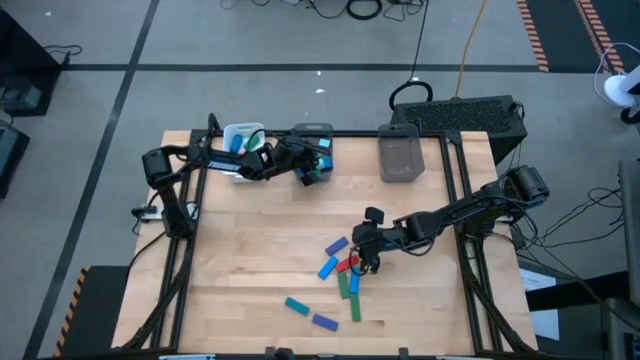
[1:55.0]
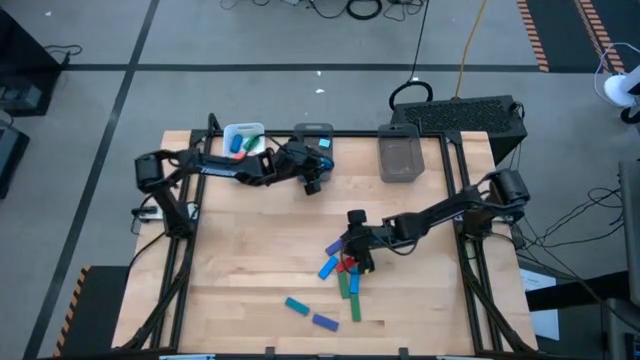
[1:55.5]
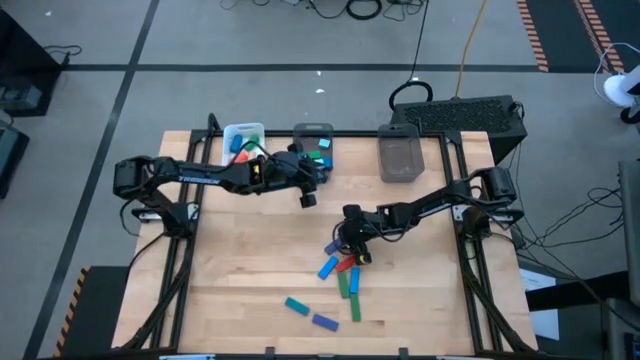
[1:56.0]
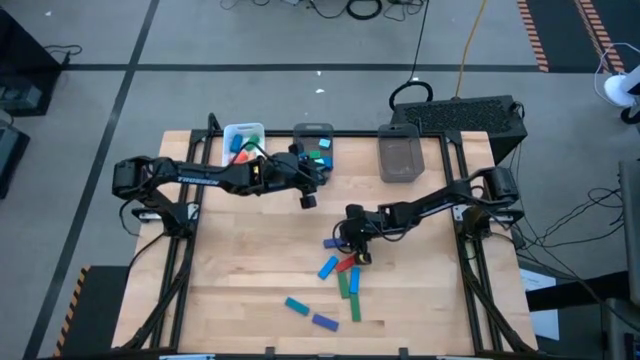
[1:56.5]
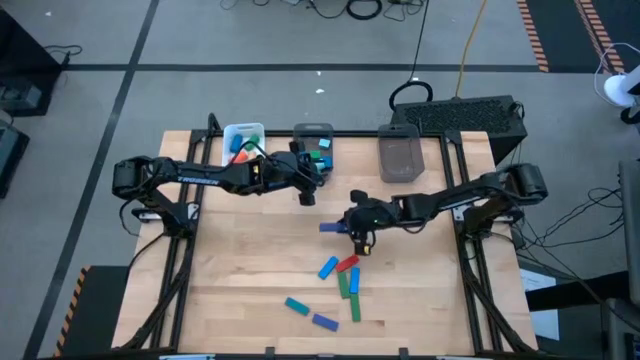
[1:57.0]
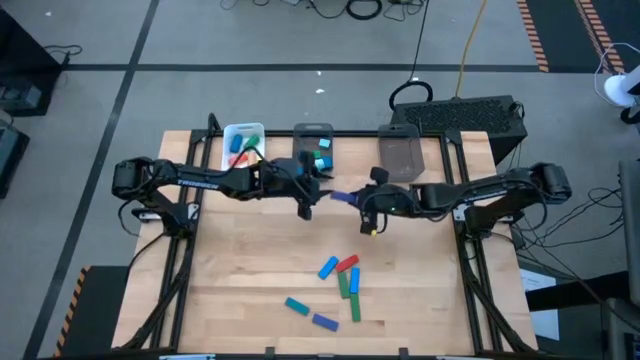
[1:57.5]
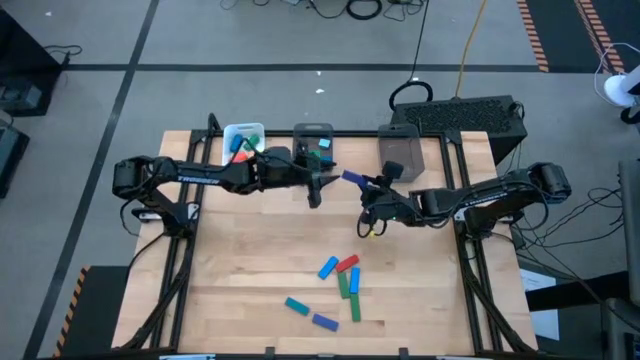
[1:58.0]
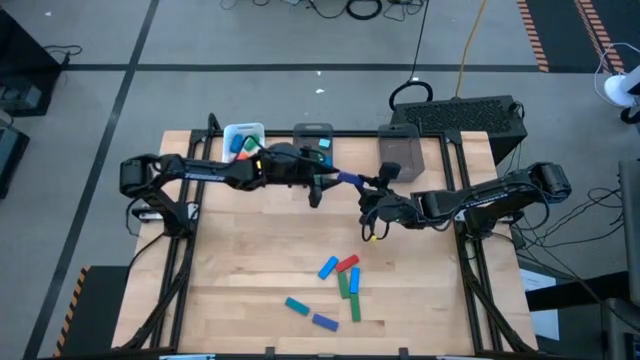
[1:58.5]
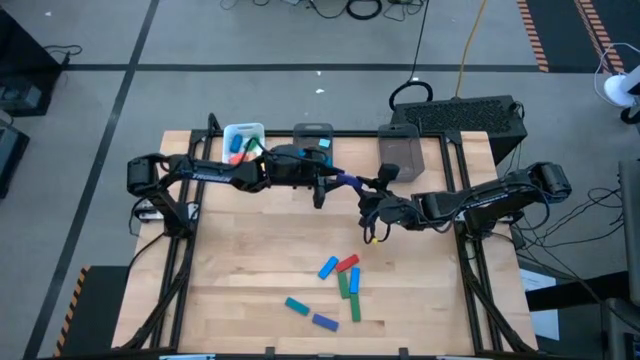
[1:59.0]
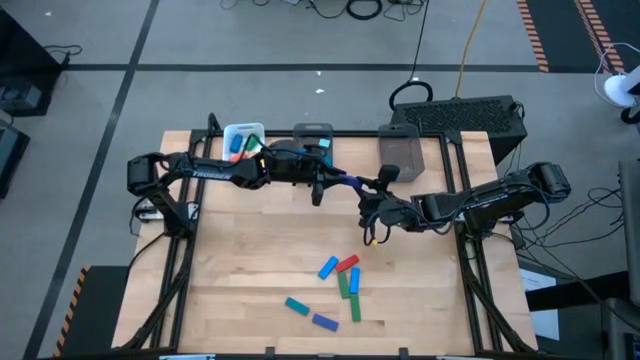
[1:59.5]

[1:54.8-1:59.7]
Task: Sort blocks by size
Put the dark blue rectangular block into the right black bin

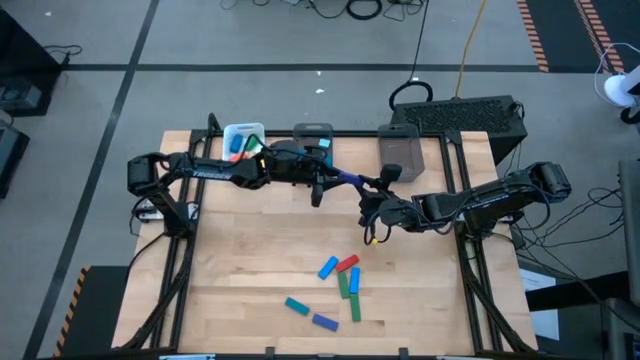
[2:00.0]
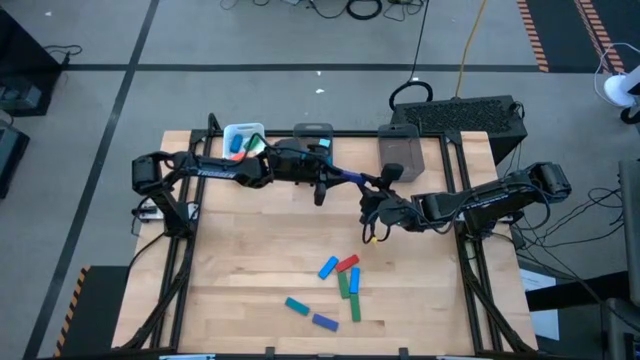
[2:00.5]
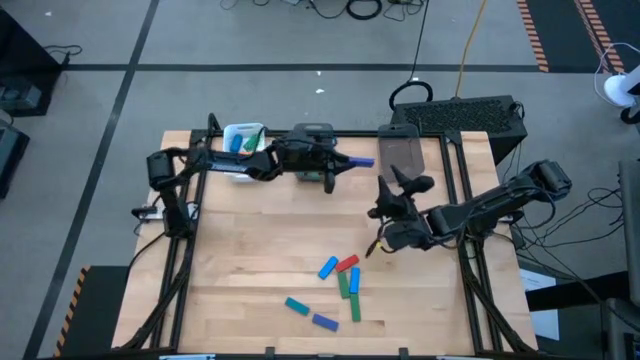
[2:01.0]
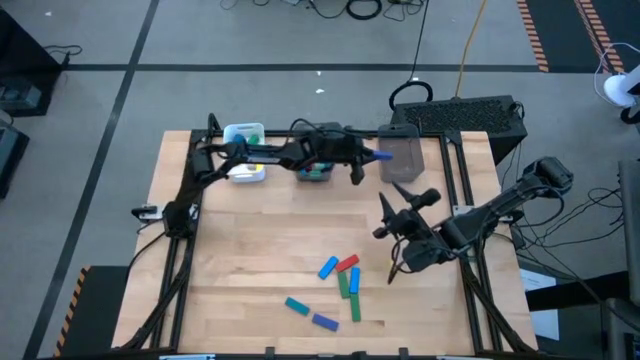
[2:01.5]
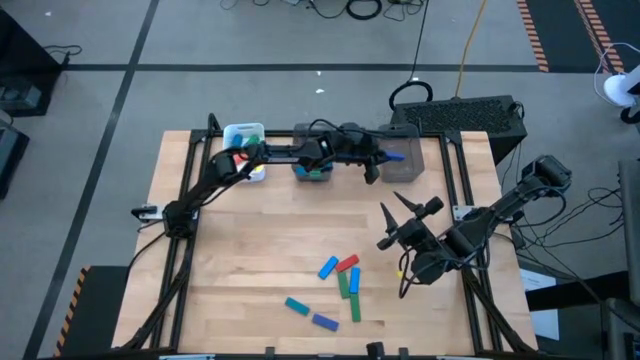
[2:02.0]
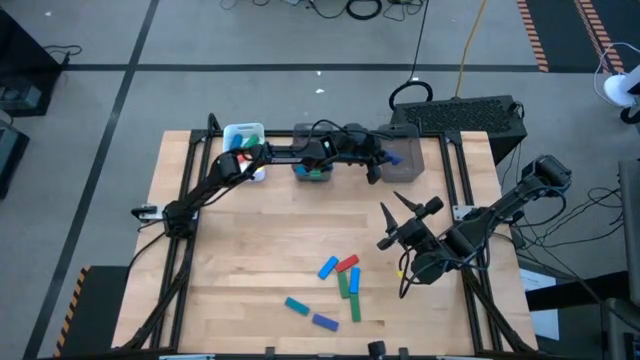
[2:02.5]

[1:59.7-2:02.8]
Put the dark blue rectangular block into the right black bin

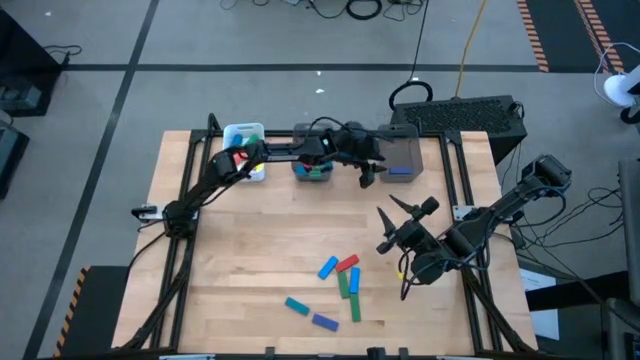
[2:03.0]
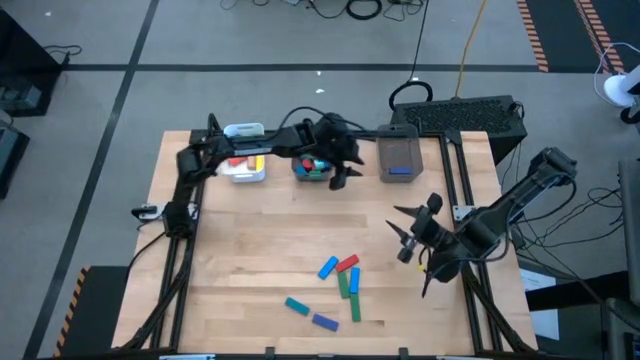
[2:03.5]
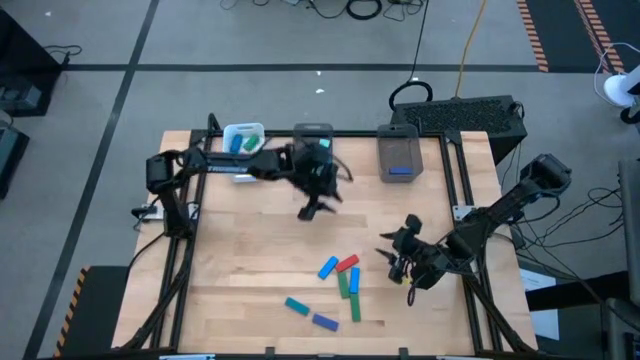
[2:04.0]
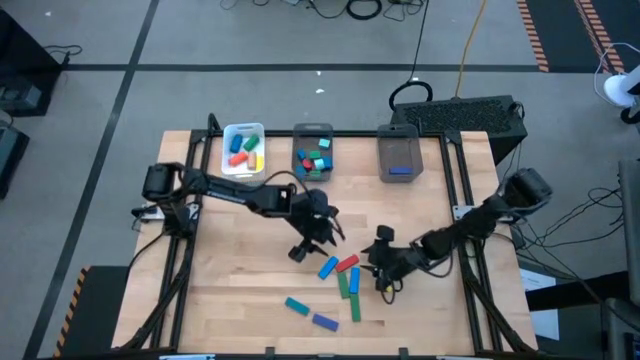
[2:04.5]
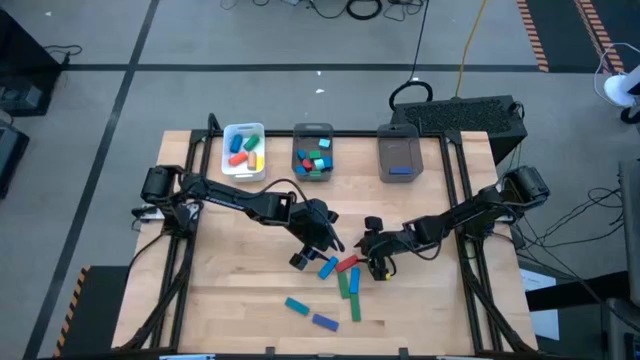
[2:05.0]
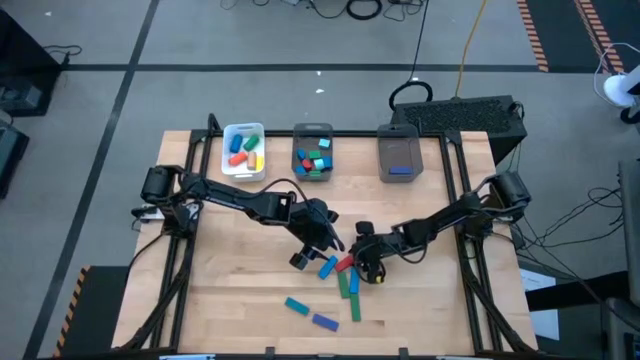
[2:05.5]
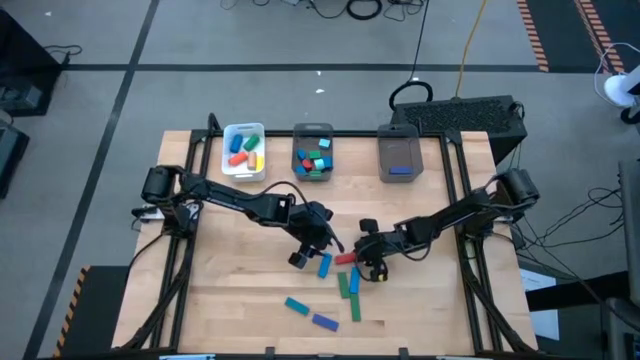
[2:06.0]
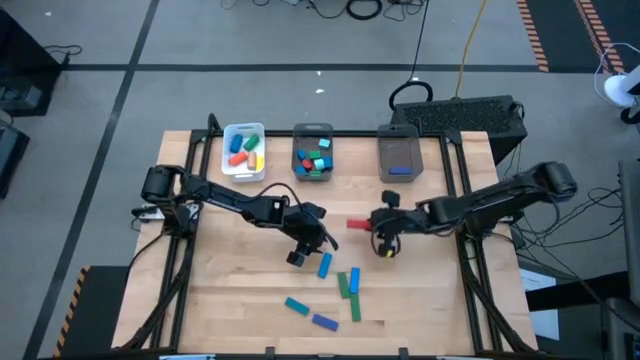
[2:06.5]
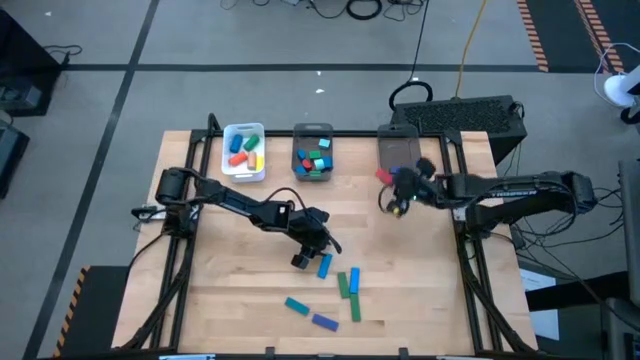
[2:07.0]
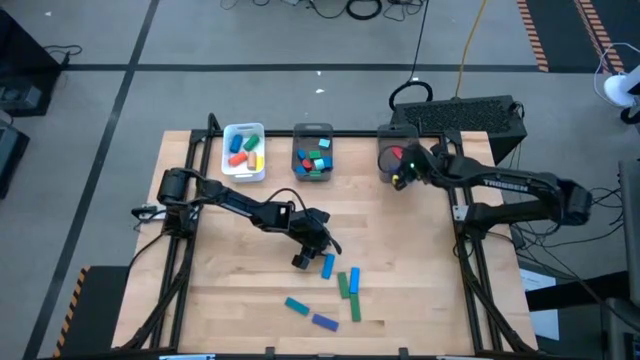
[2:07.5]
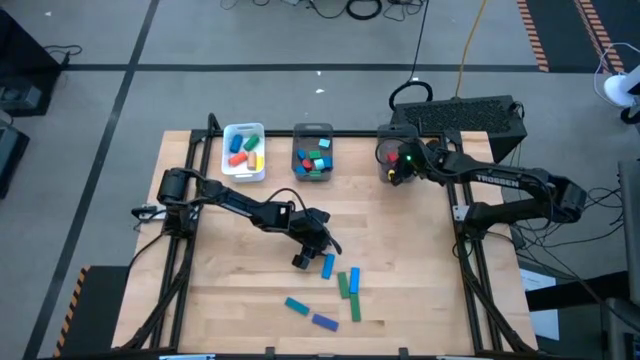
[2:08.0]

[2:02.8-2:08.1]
Put the red rectangular block into the right black bin

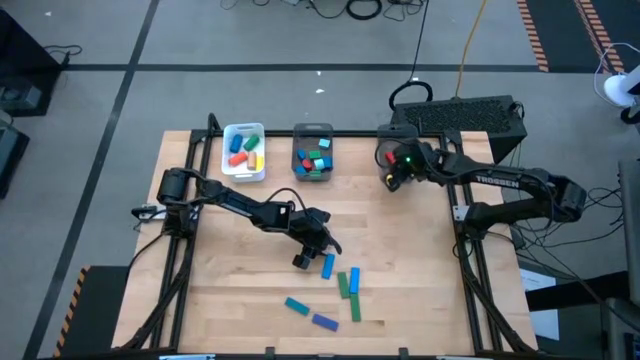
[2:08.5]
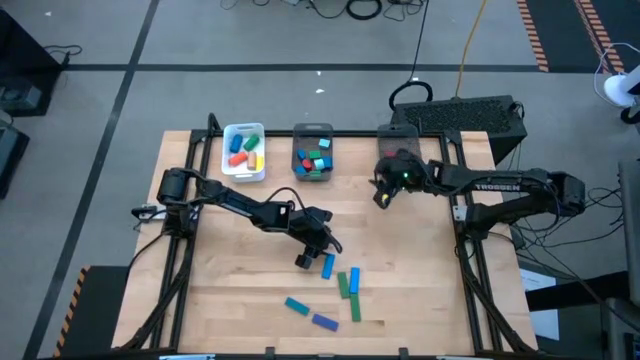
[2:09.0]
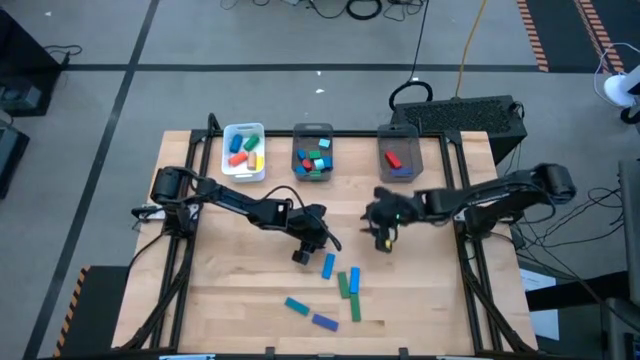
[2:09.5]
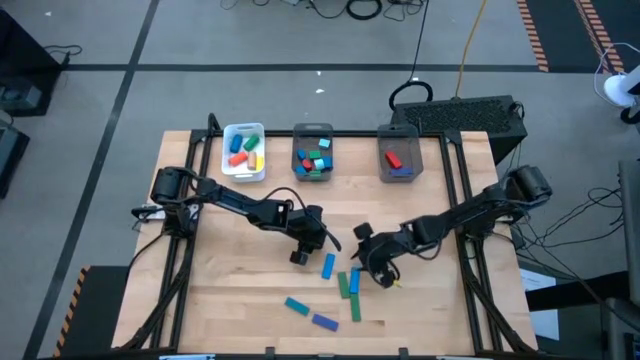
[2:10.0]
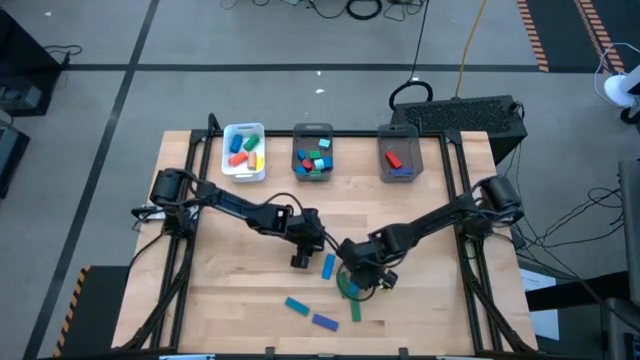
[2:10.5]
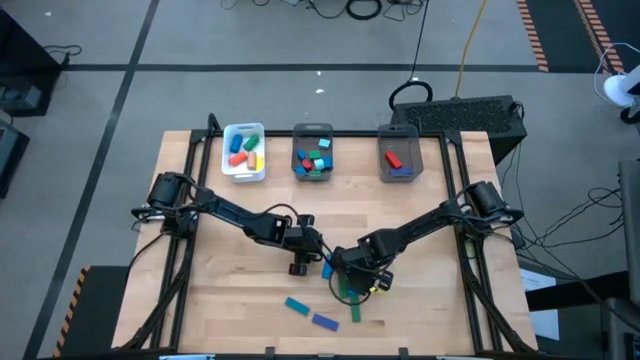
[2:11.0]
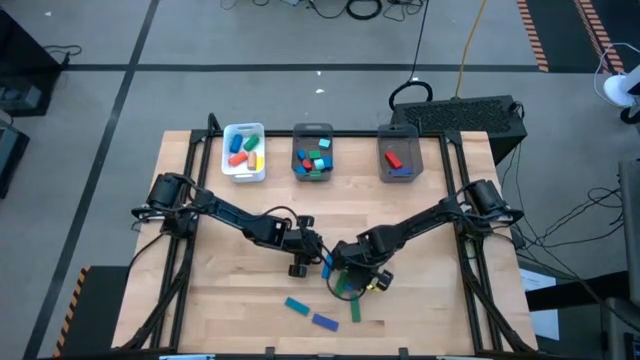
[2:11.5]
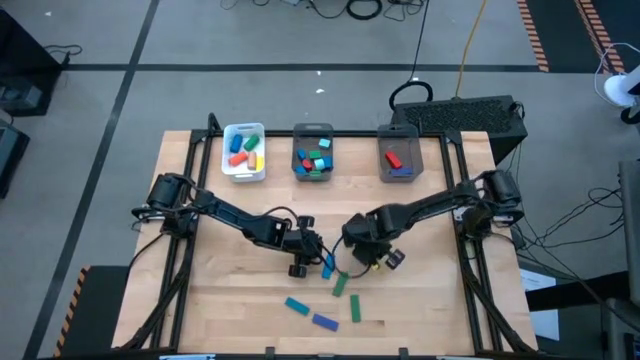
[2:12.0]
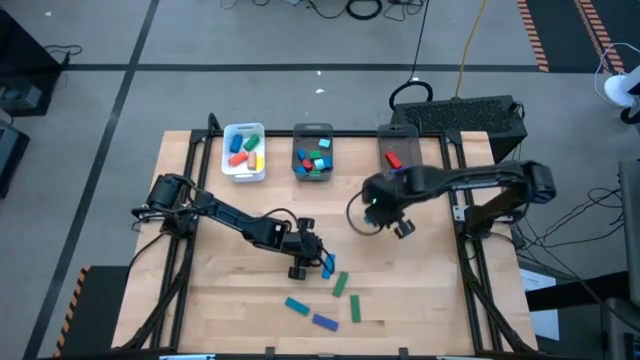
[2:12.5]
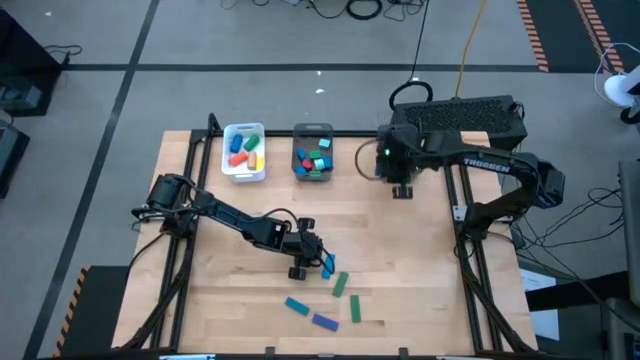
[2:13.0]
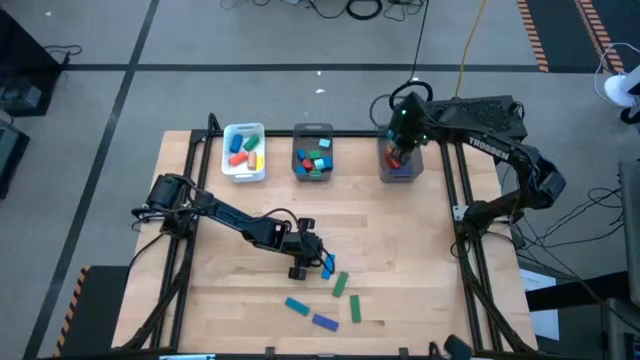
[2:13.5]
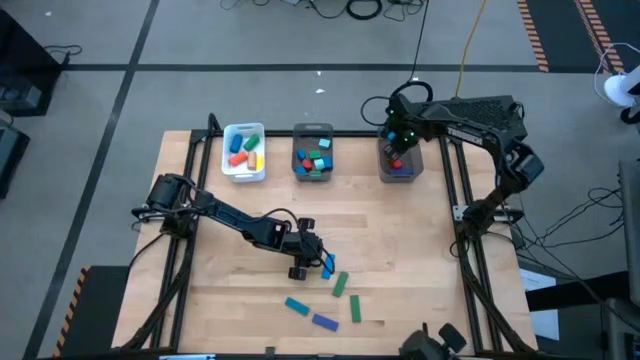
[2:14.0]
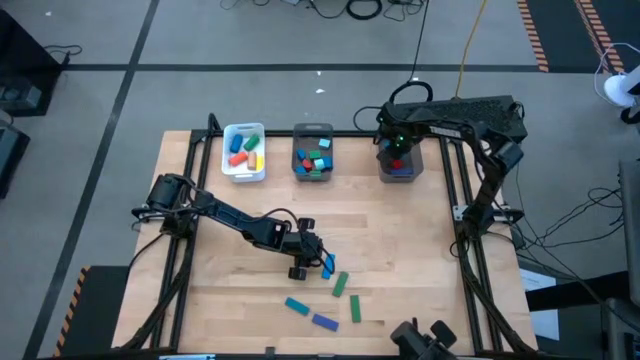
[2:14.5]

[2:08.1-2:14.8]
Put the light blue rectangular block into the right black bin

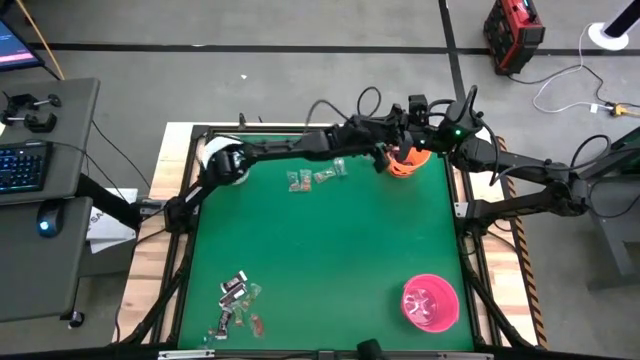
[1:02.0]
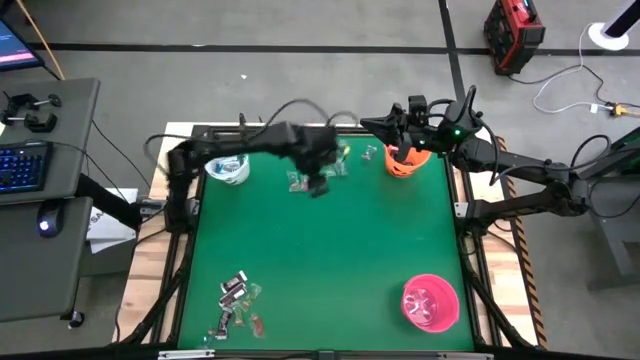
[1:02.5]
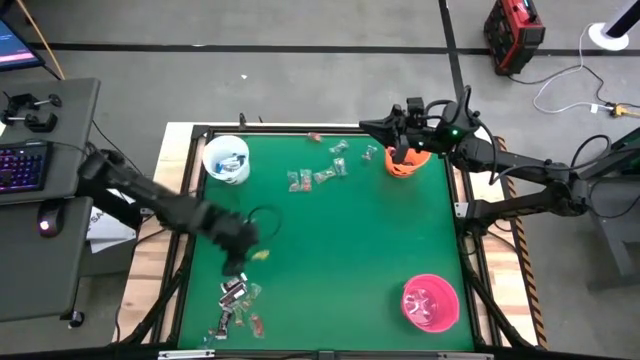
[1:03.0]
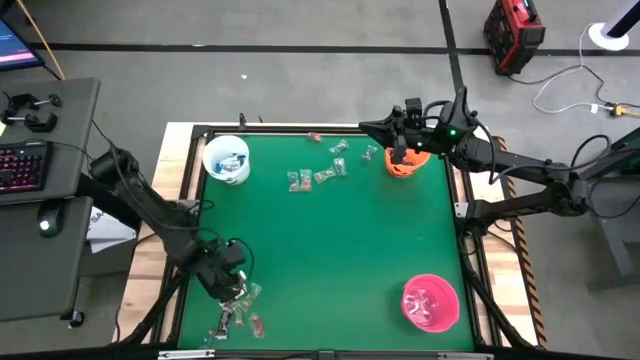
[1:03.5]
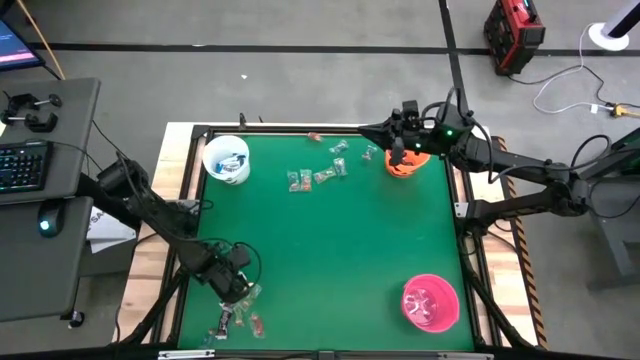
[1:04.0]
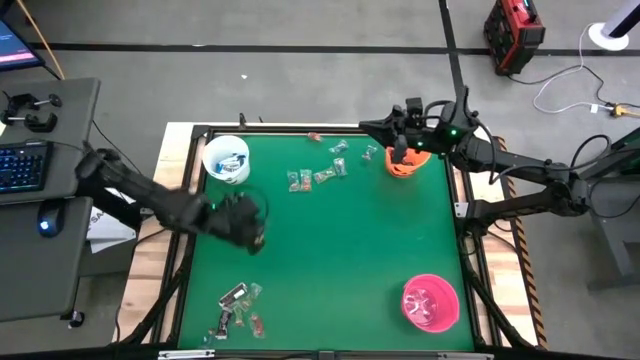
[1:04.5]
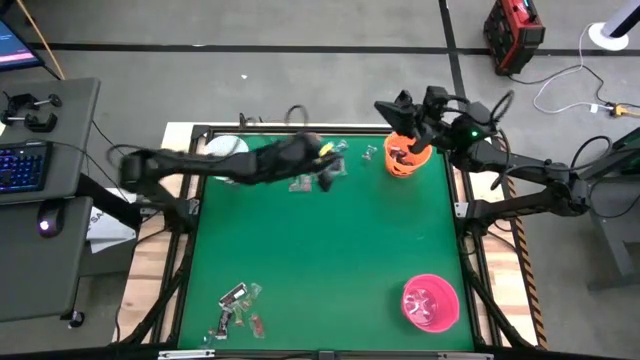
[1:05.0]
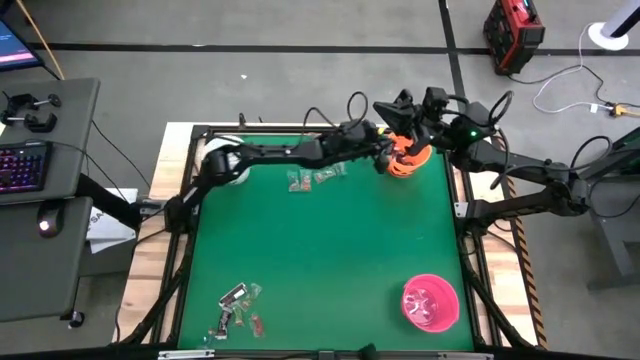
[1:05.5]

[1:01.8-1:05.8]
Task: Sort candy by brand, put in halloween buckets
Put the brown chocolate bar into the orange bucket
